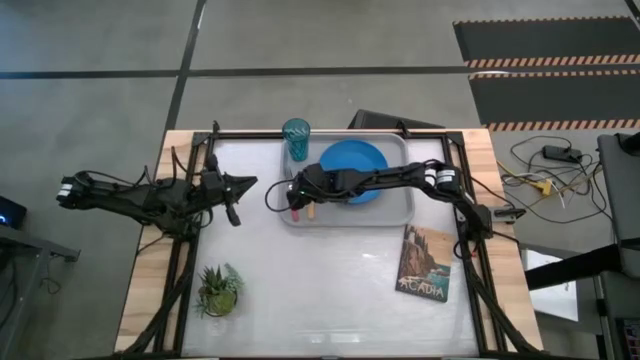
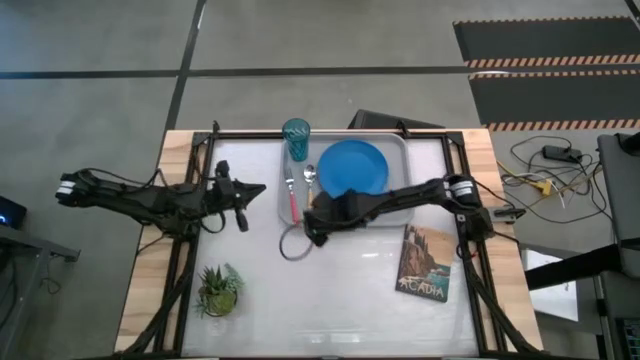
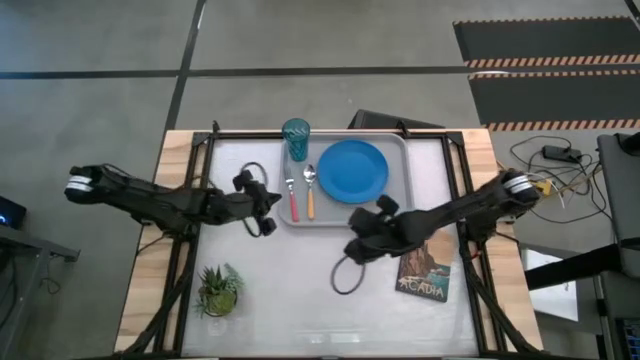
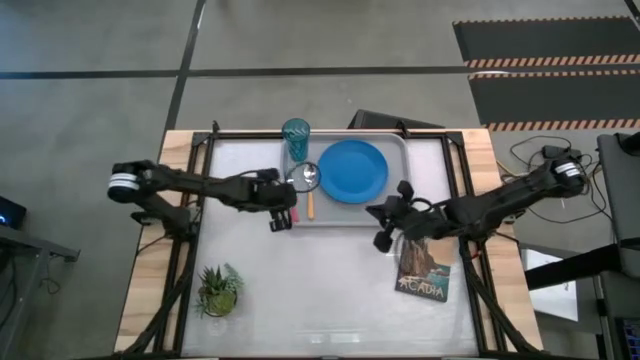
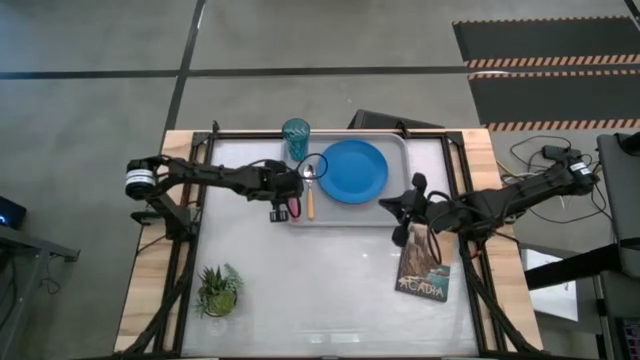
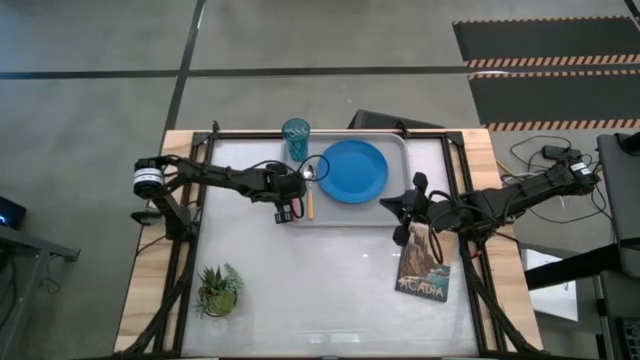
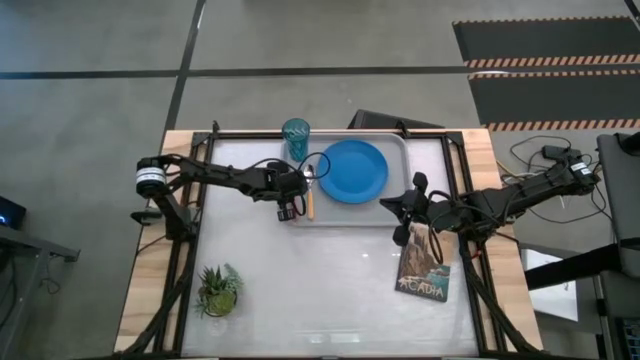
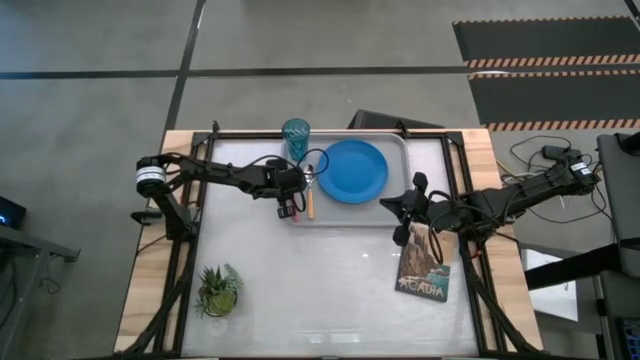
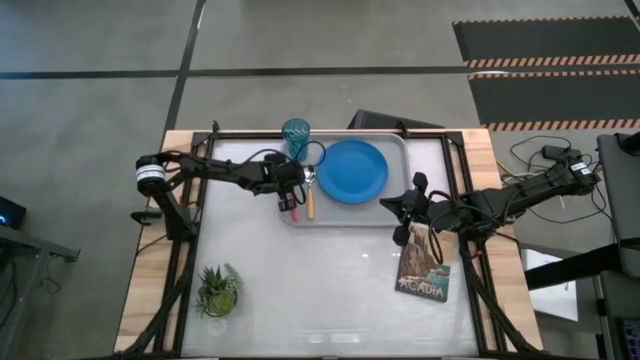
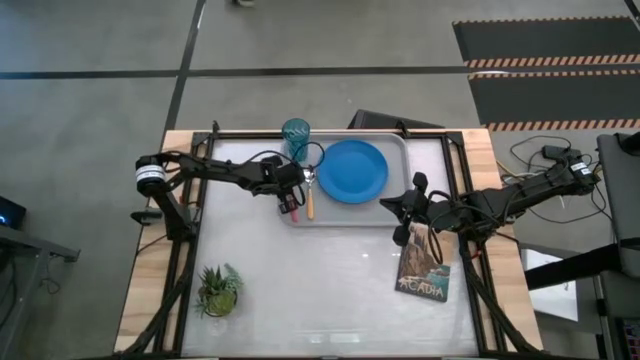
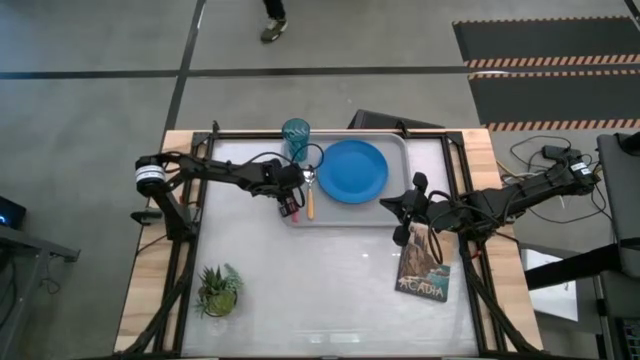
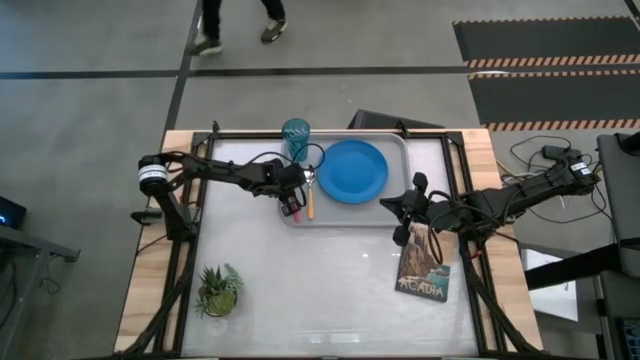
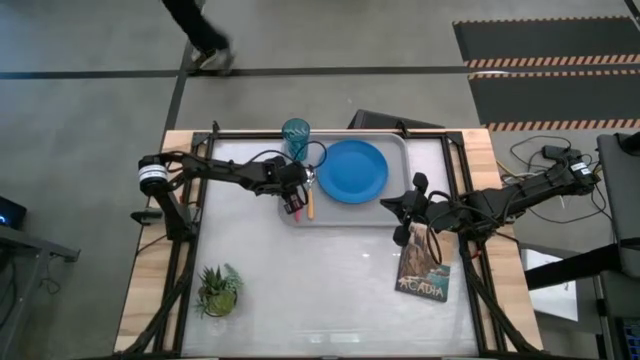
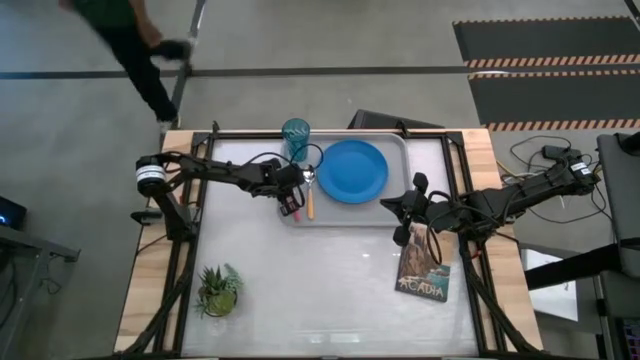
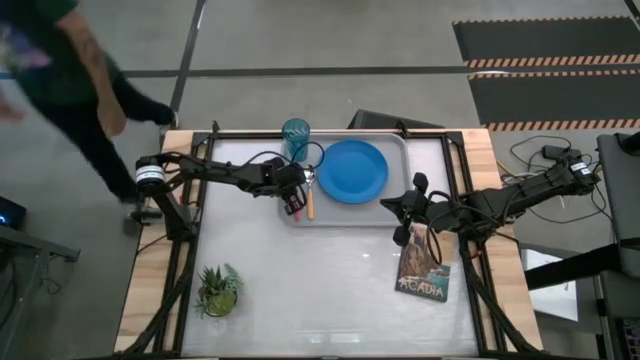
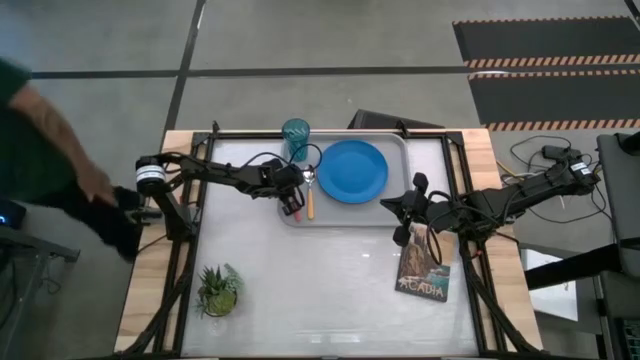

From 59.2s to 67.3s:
Task: Pick and place plate/cup/fork/spoon on tray
Adjust the pink fork

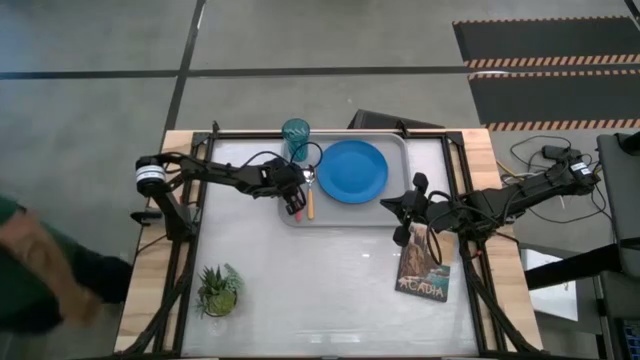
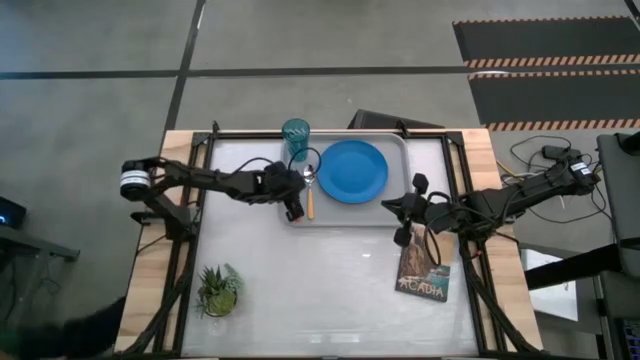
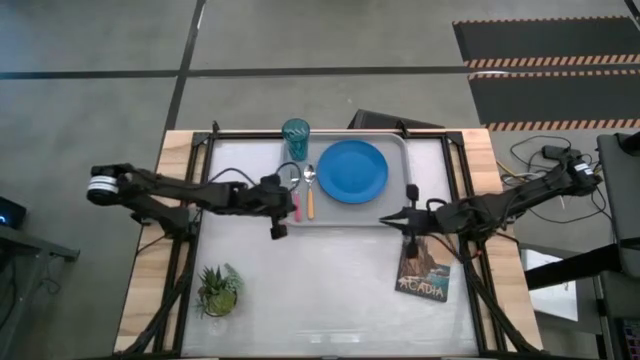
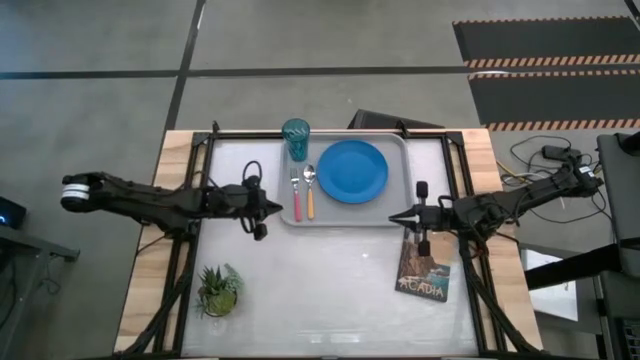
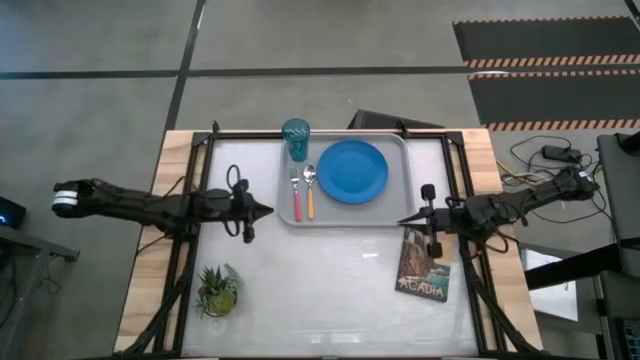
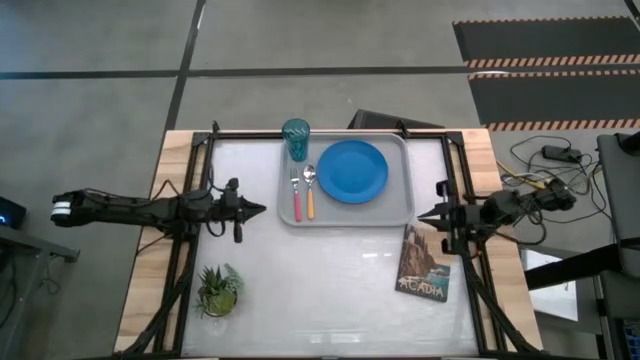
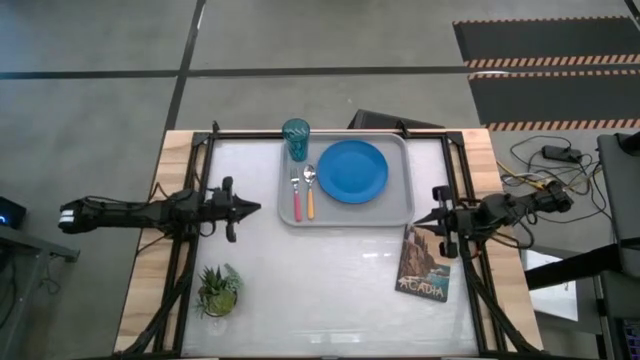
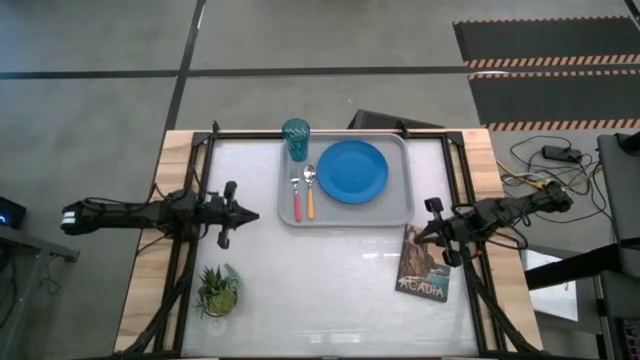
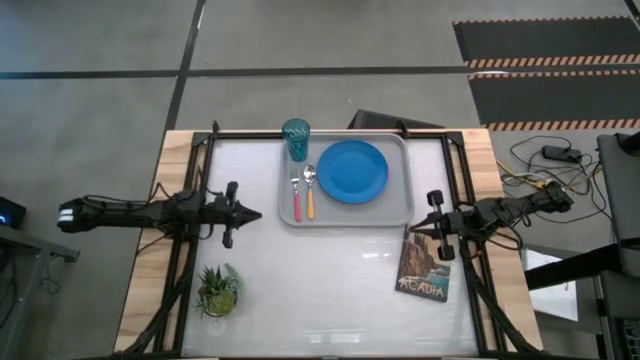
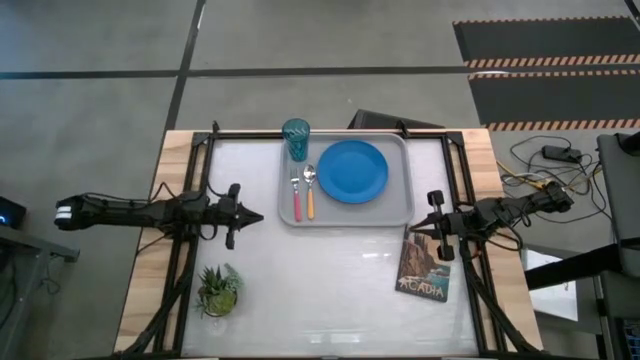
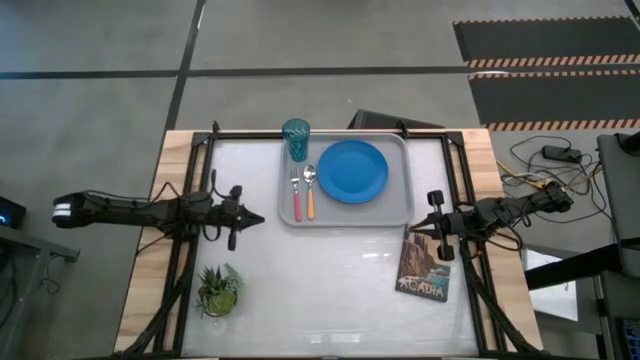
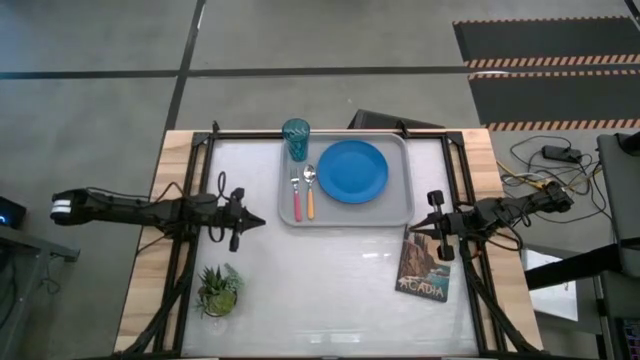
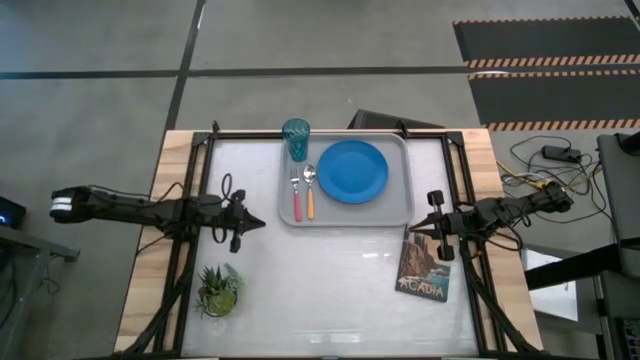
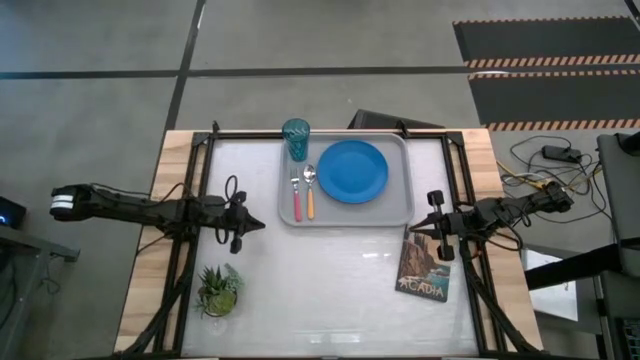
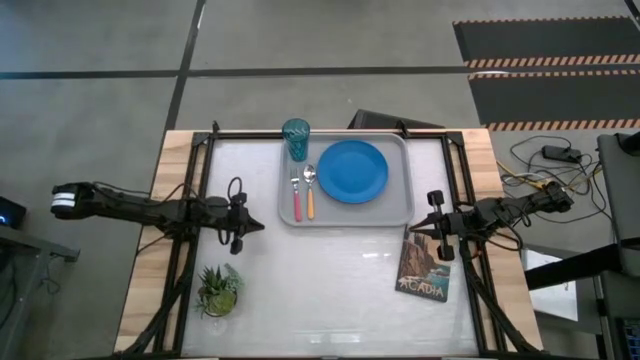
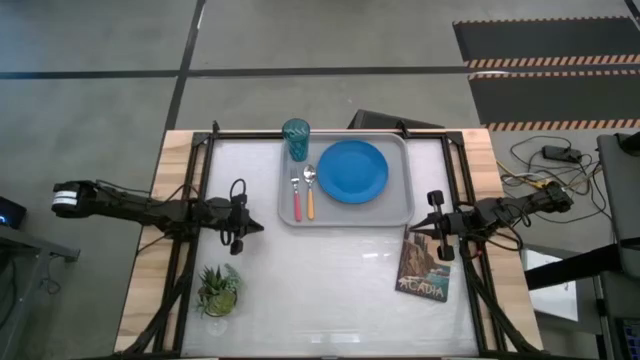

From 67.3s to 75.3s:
Return to Home Position

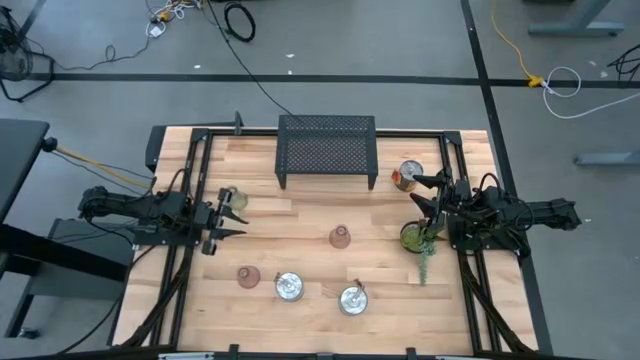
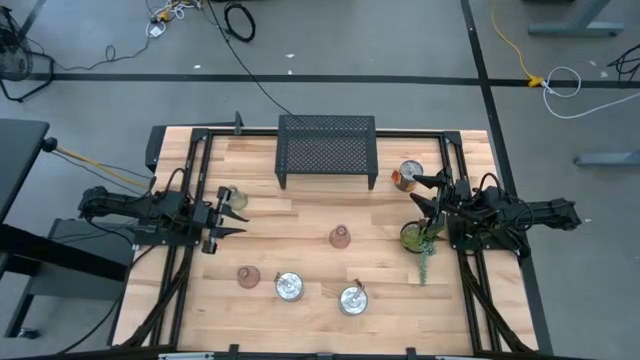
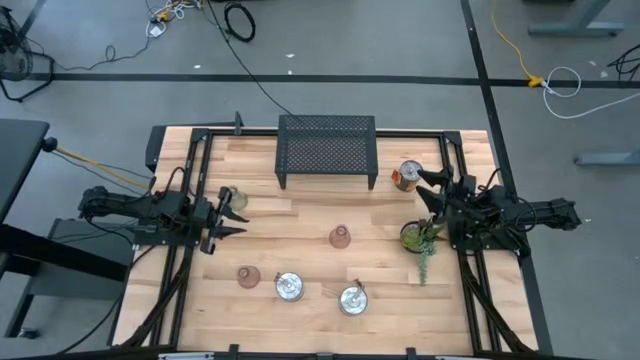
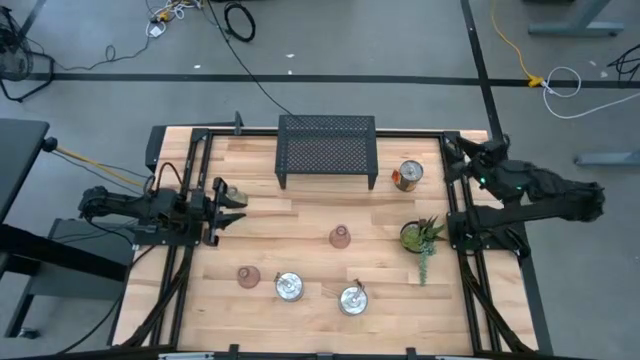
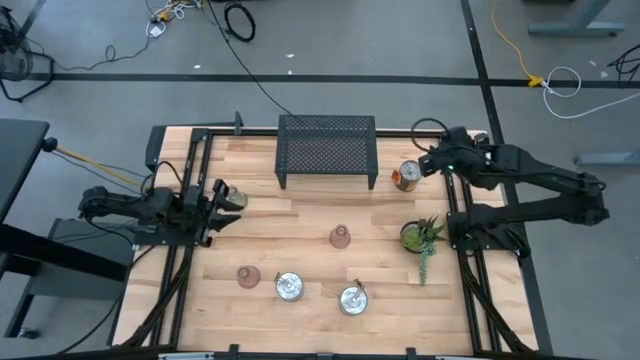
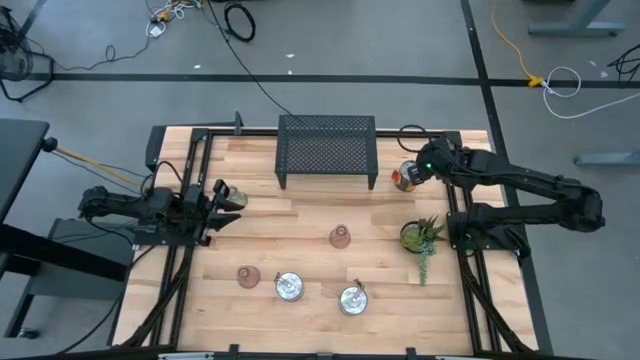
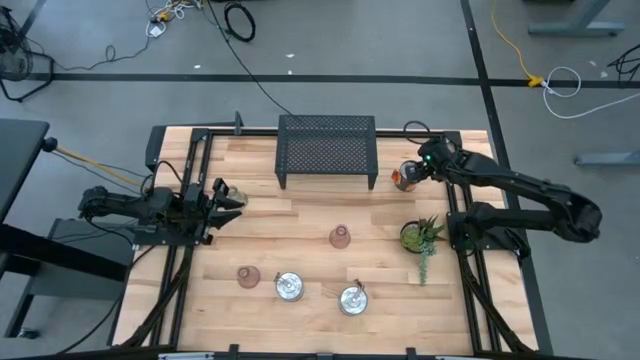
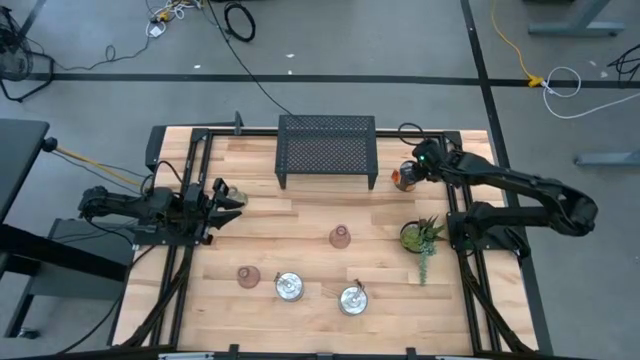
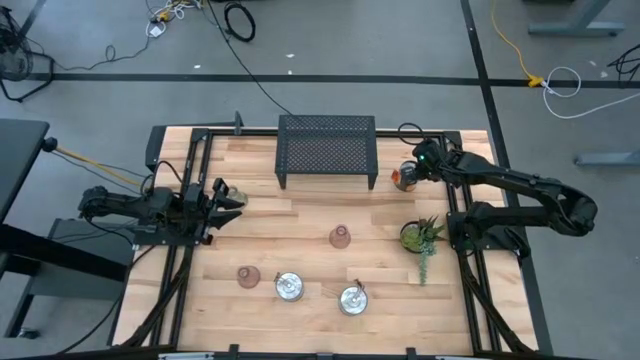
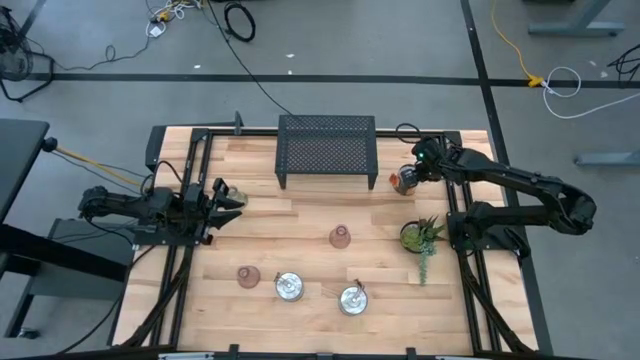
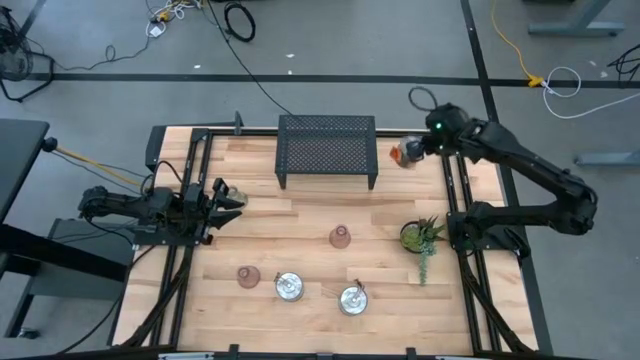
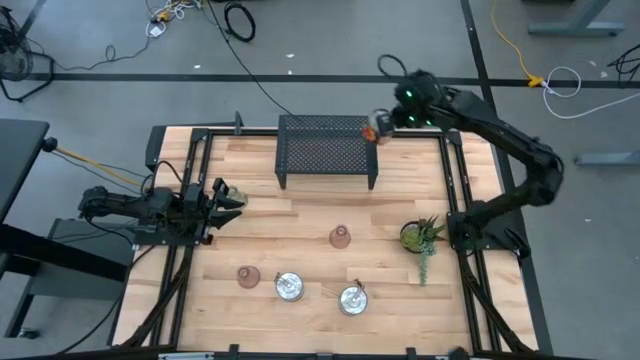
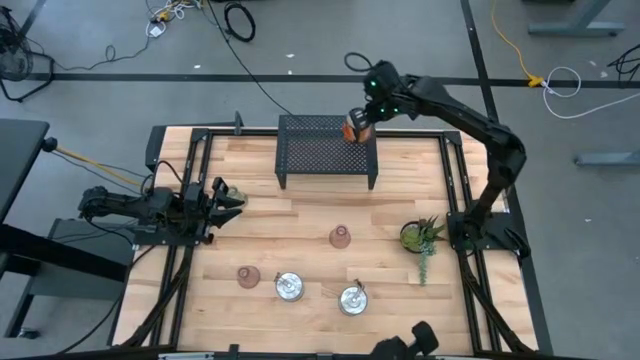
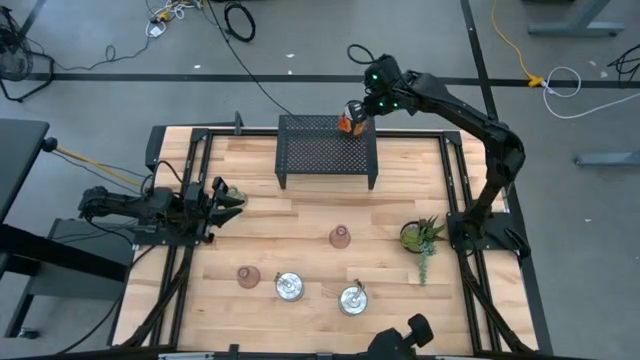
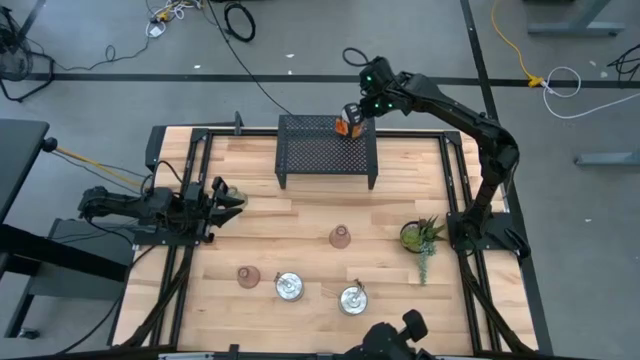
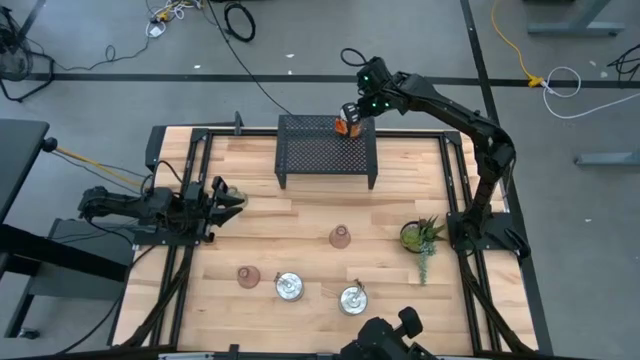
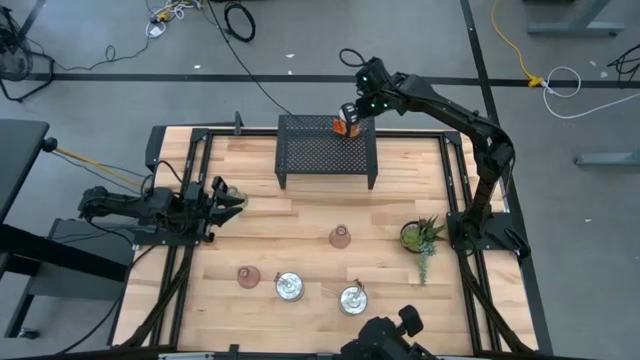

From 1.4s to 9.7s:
Task: Pick & Place candle stick holders
Put the orange scented candle on the shelf
